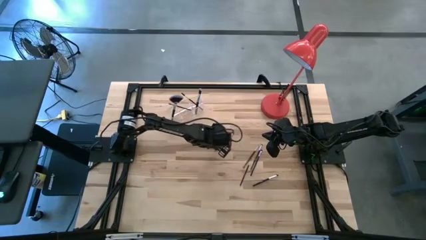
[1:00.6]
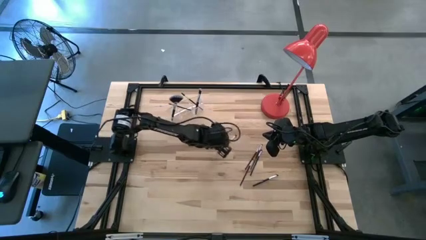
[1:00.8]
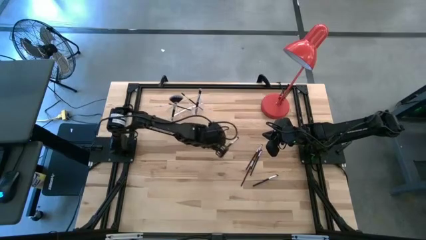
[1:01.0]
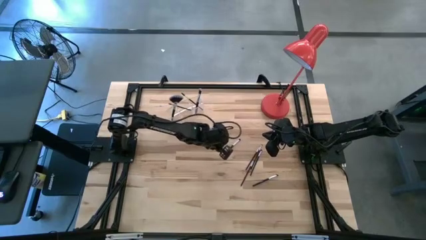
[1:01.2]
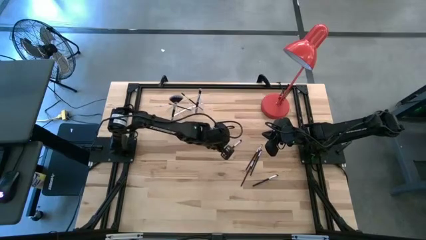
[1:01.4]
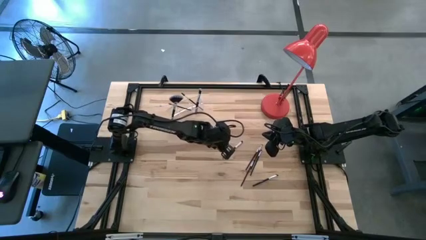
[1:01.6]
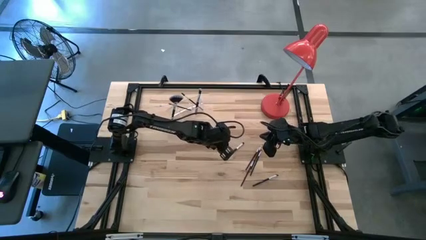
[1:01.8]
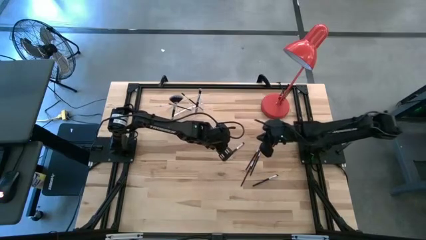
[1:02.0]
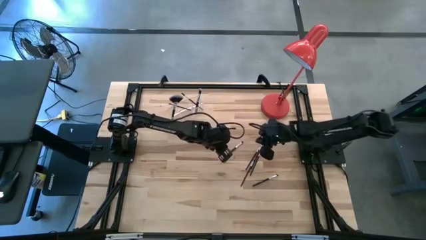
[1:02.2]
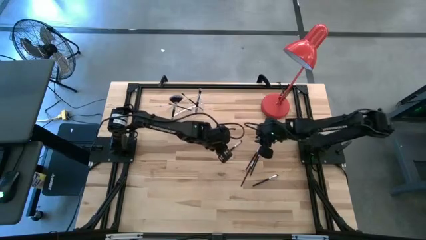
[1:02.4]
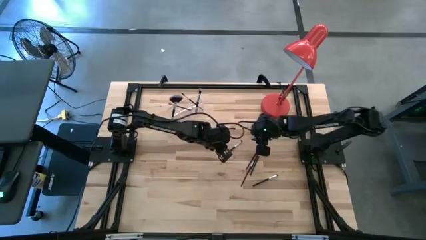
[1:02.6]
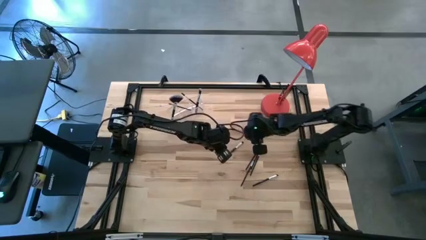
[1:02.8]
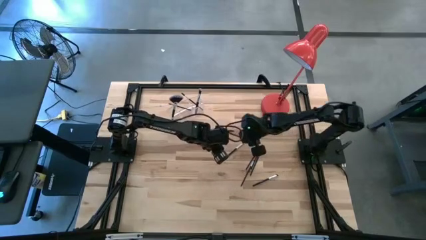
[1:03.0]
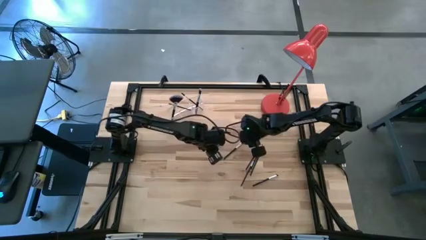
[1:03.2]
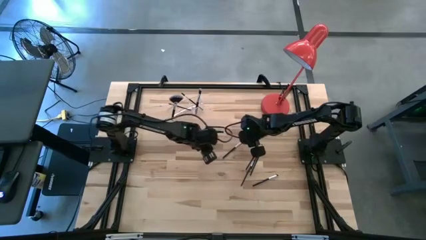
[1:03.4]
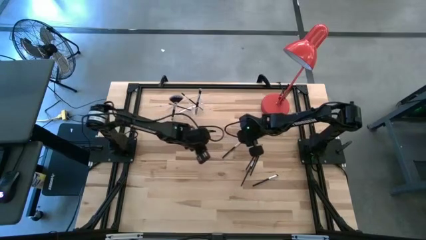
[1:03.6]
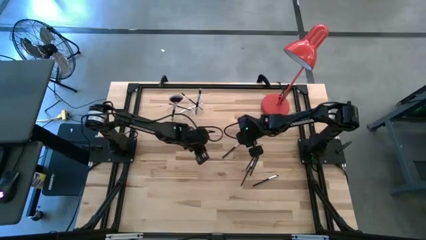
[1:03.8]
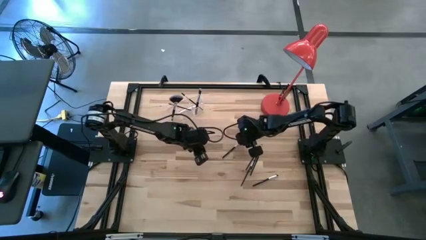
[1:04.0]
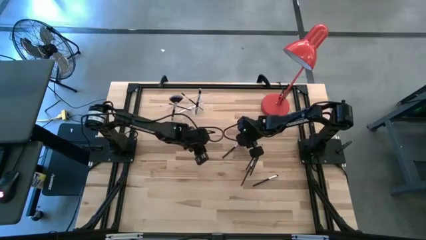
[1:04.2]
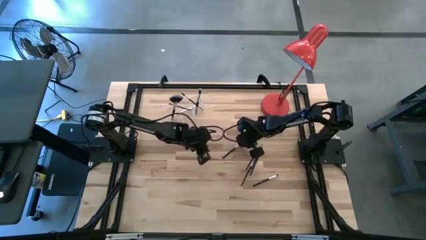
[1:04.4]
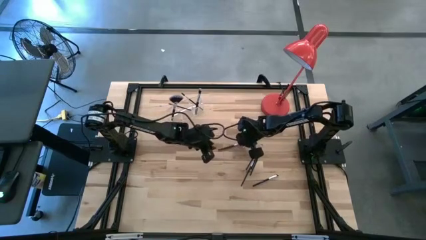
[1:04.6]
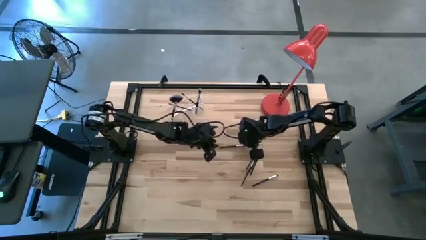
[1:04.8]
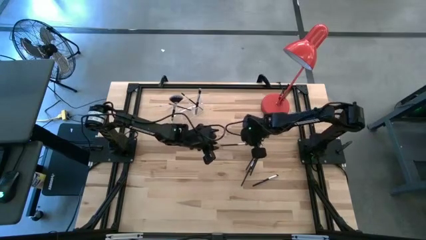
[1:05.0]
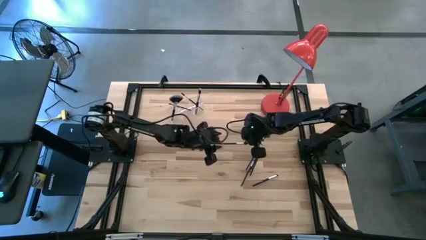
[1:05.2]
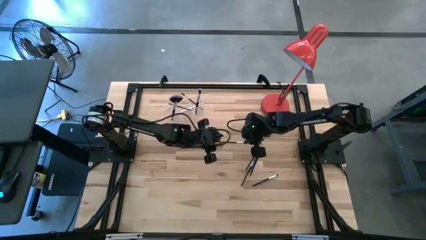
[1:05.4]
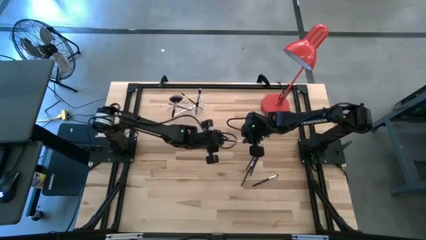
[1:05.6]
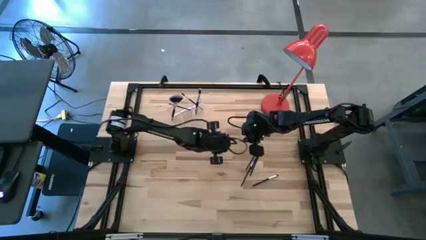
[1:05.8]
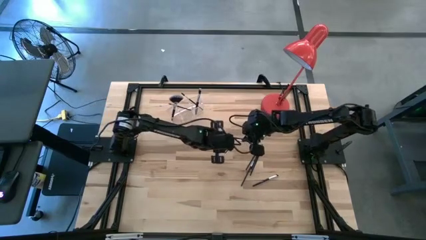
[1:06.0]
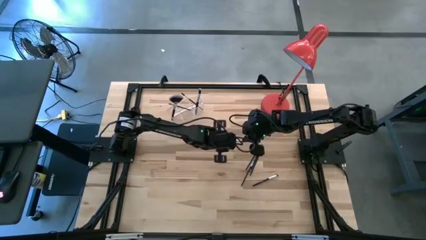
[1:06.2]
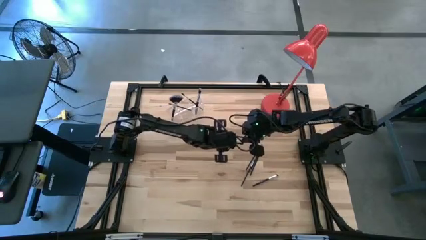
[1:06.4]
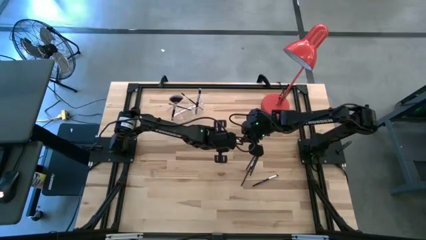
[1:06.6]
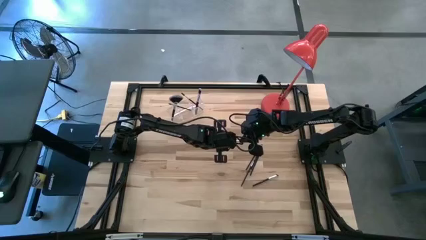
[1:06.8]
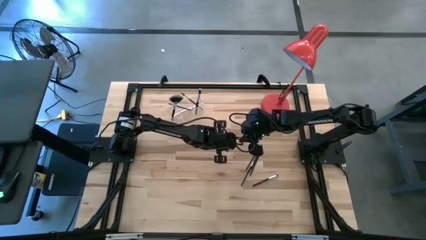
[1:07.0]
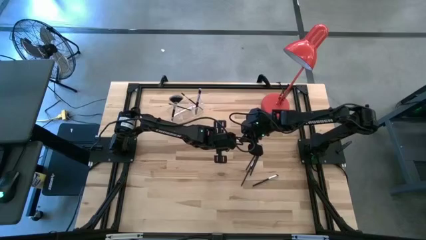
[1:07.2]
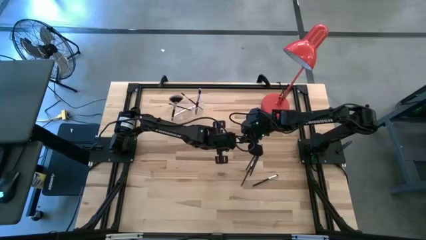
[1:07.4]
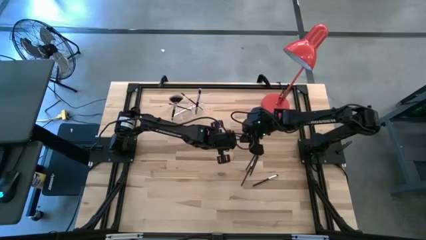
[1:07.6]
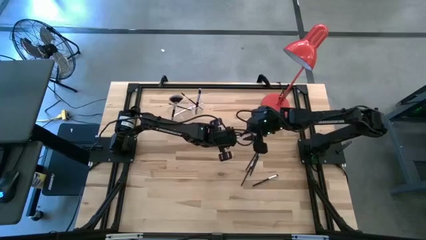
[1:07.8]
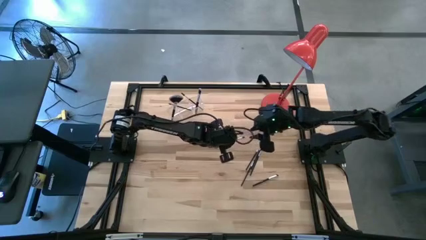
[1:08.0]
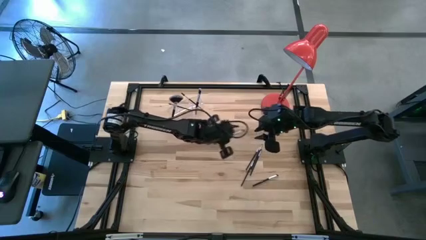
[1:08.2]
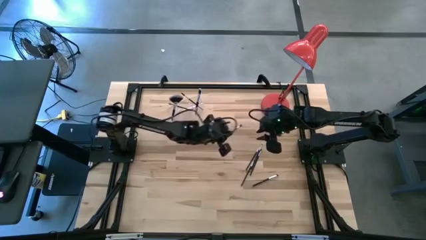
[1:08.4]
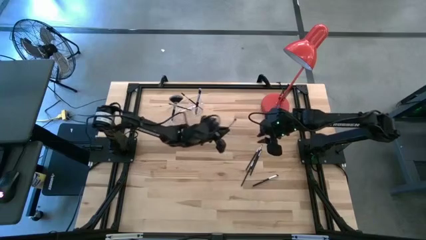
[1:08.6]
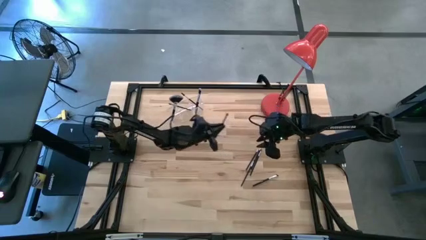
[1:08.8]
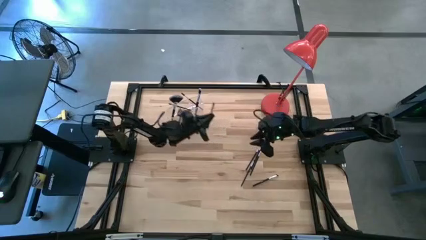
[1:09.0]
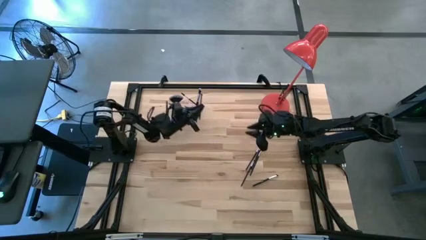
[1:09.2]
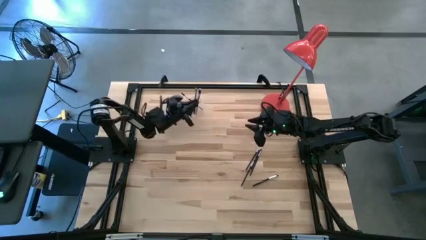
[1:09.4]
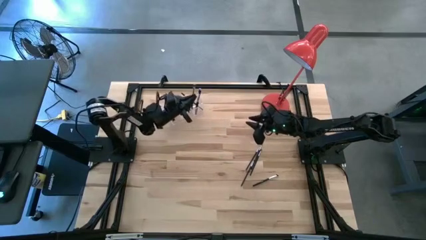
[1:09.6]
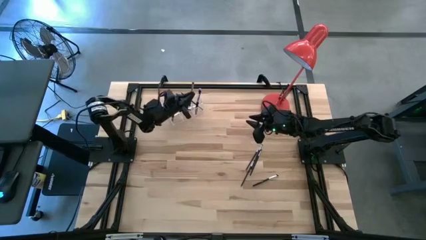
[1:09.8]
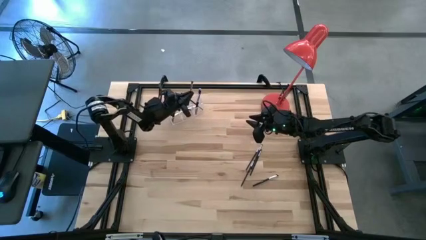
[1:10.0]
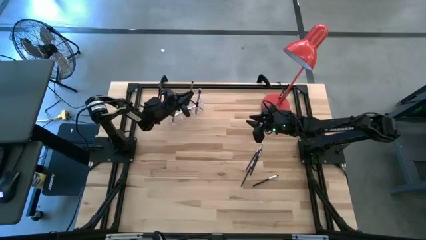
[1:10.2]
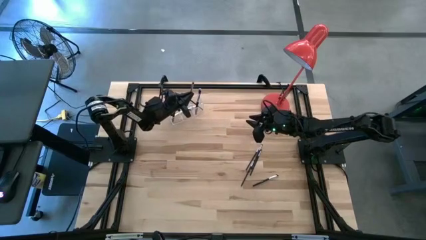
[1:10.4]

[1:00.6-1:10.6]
Task: Put items in baskets/containers
Put the eyeshadow brush into the transparent organizer

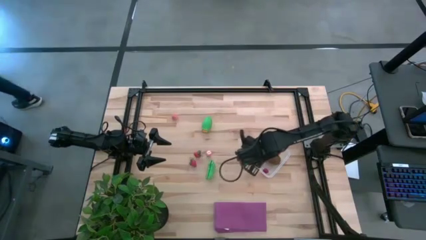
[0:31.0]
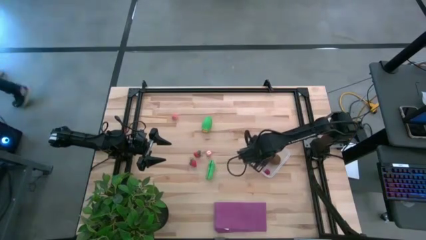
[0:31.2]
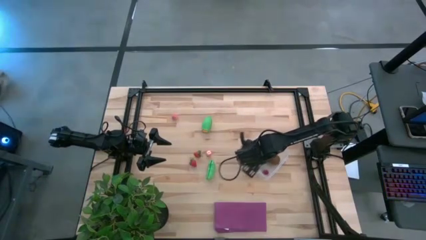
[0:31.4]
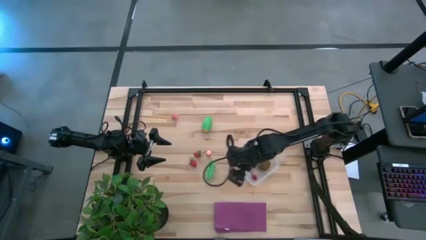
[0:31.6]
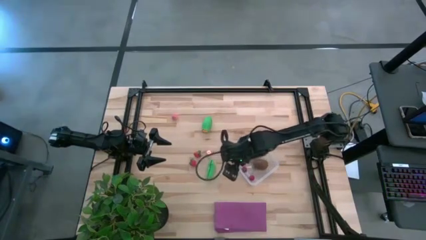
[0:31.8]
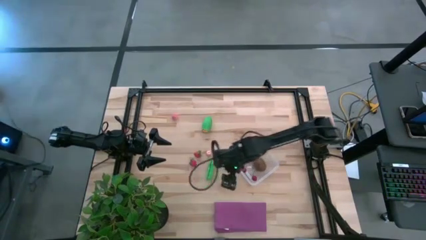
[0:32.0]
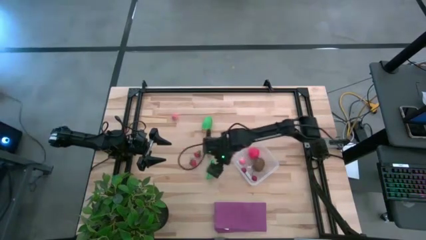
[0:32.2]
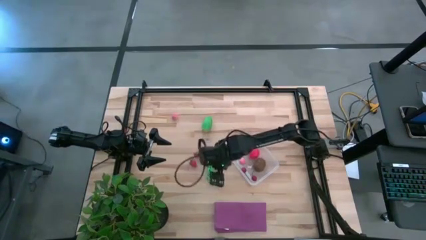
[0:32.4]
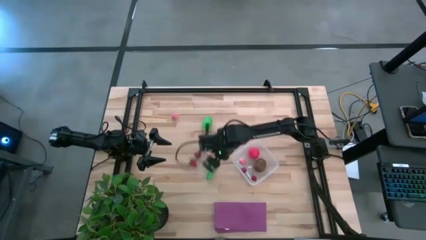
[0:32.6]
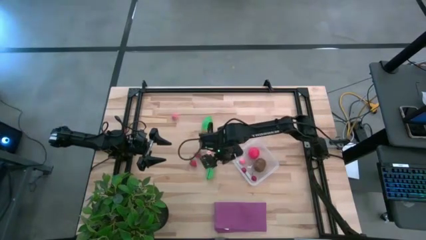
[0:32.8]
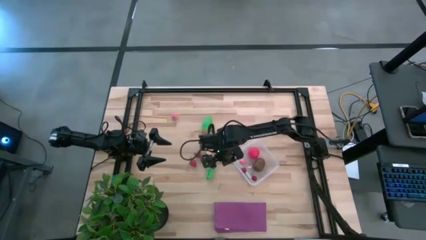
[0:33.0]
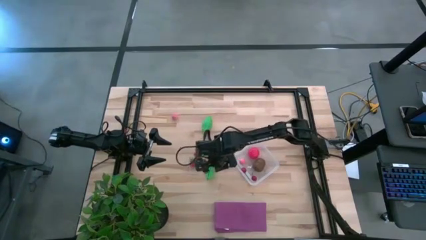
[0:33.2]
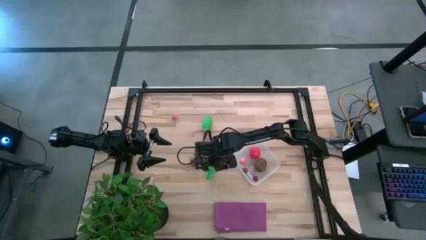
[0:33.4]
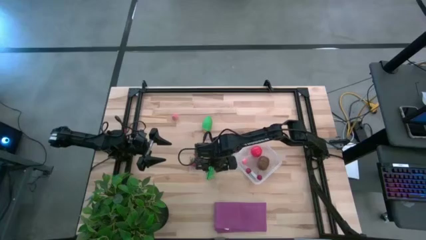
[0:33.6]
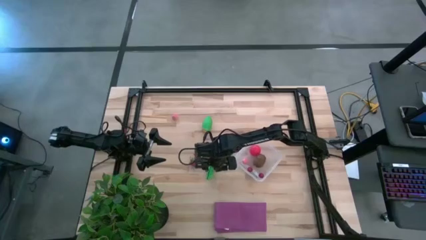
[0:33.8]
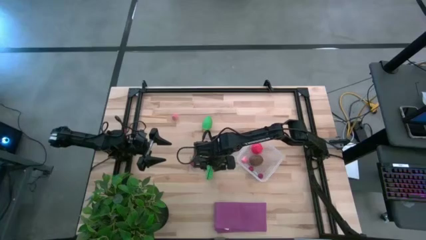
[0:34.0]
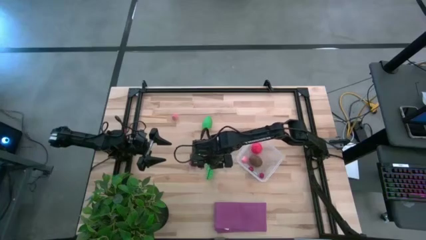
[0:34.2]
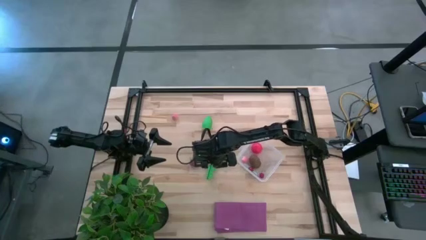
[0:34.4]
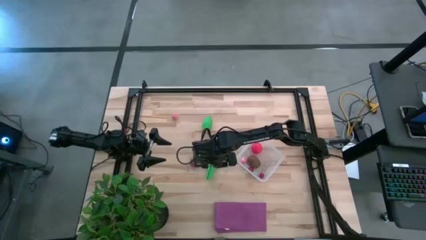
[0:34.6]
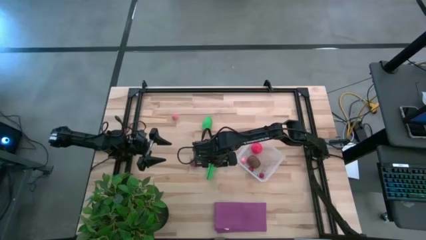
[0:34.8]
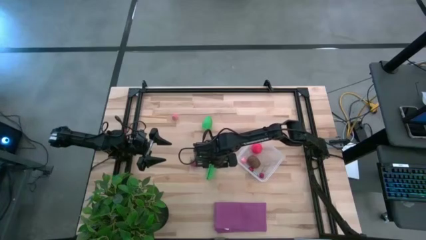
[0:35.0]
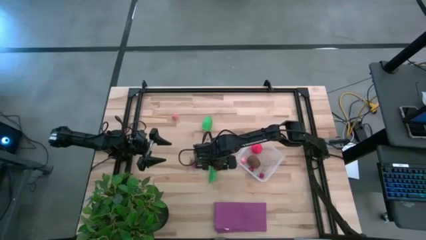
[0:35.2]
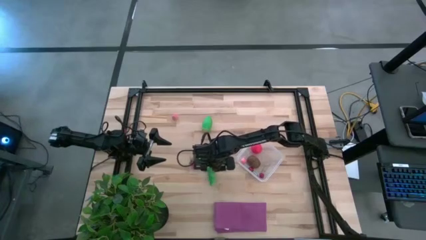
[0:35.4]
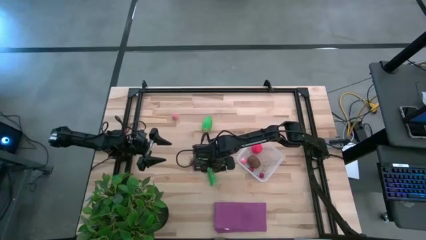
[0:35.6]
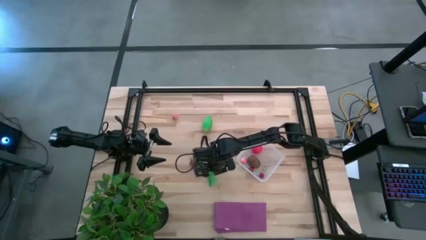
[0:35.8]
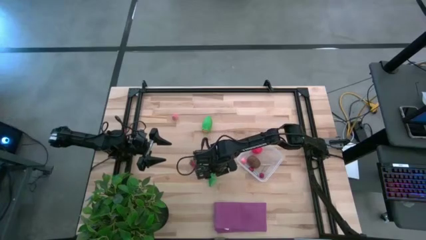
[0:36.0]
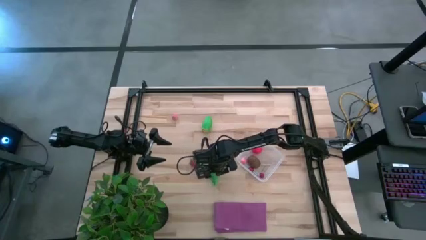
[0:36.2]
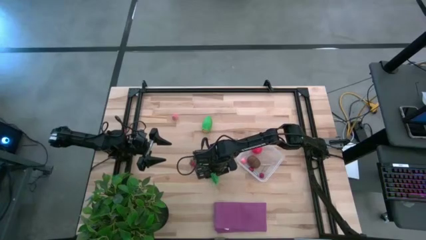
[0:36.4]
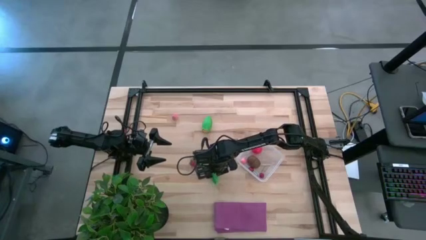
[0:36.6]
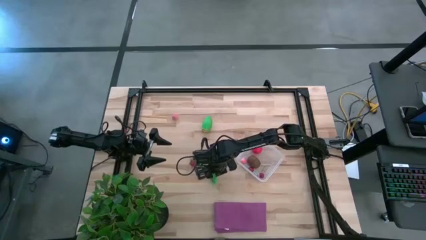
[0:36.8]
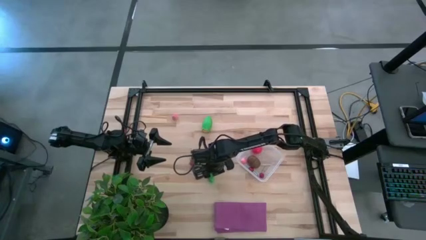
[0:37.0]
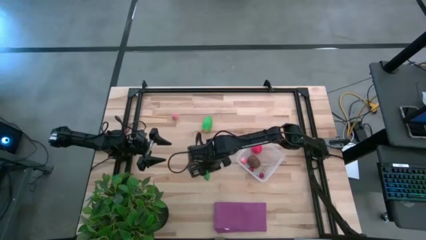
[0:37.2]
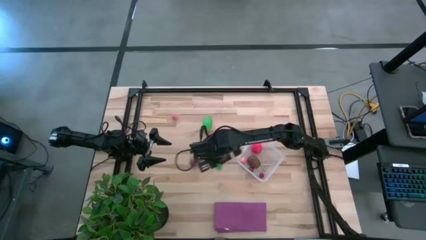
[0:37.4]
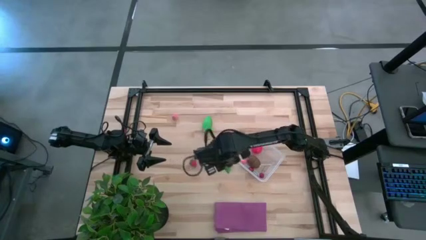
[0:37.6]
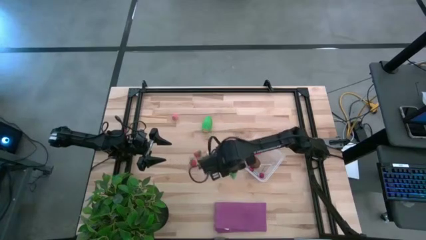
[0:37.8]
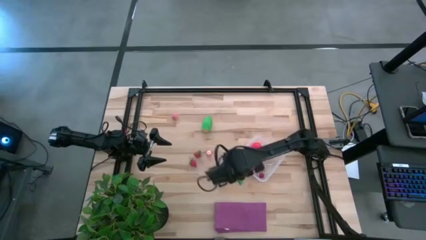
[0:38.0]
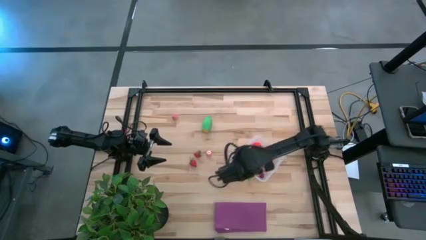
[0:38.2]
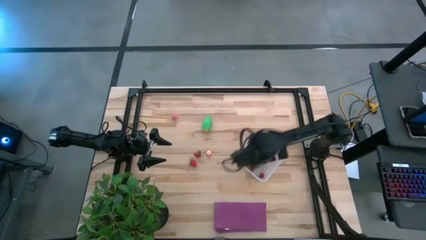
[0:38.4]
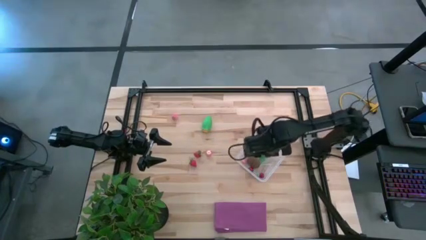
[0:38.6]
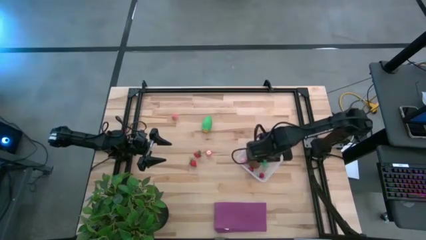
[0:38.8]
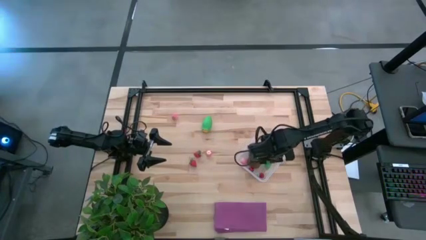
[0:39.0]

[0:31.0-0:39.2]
Task: Pick and placing Produce into tupperware
Put the green peas into the transparent bin
